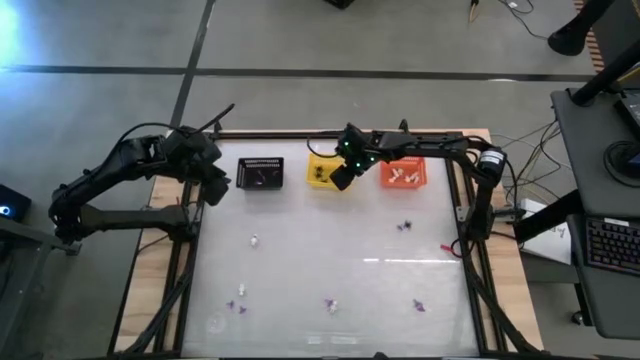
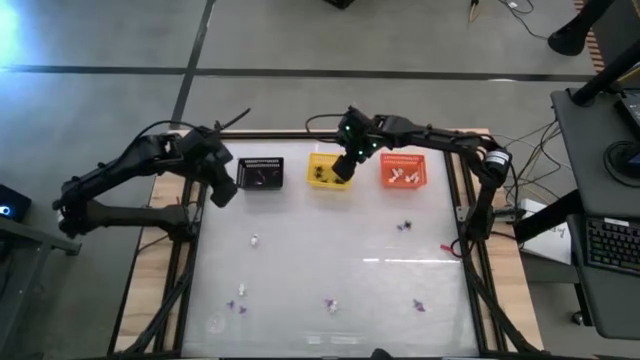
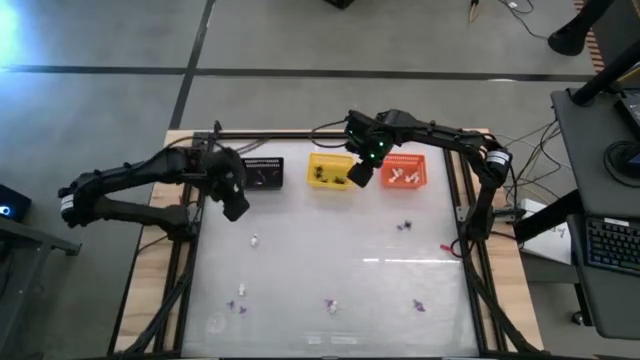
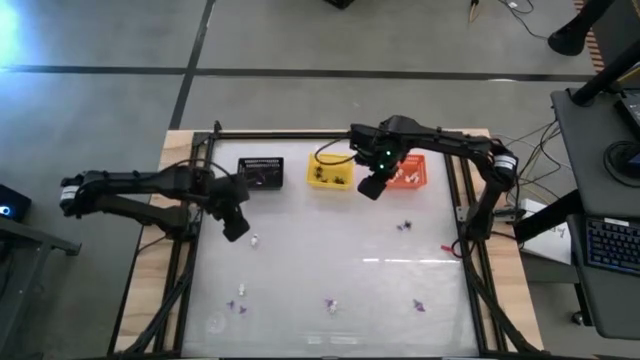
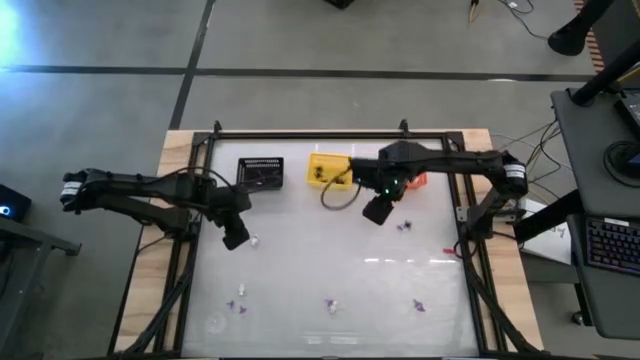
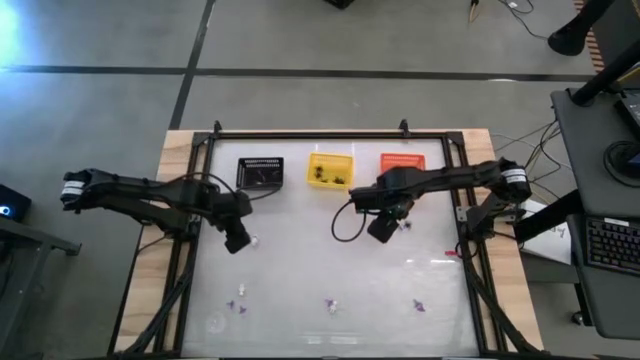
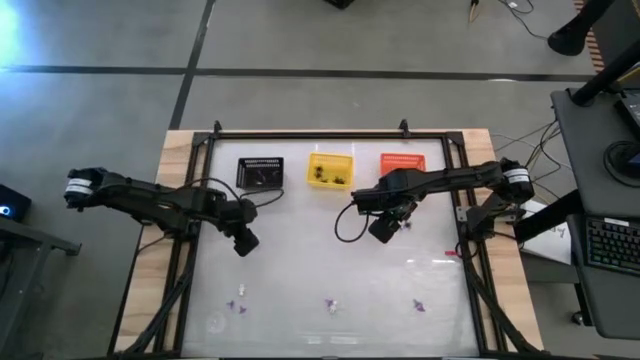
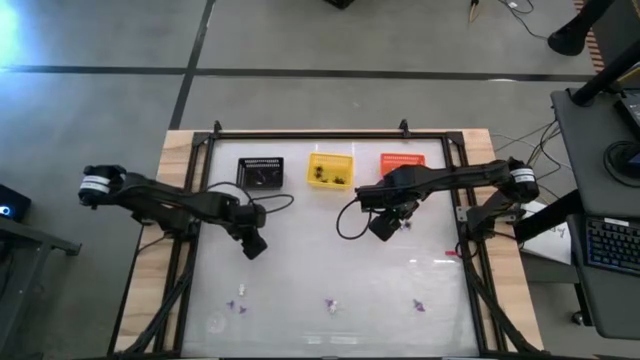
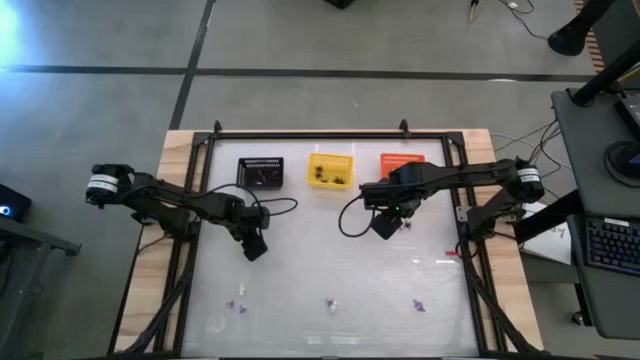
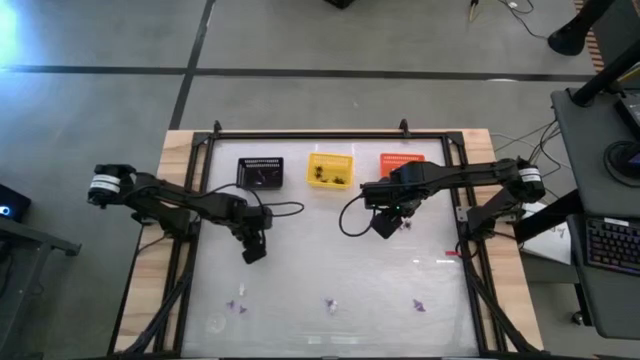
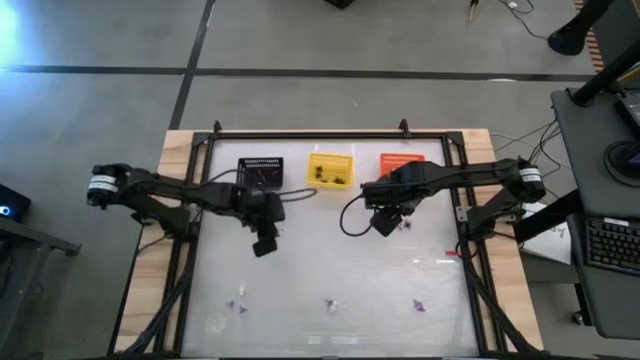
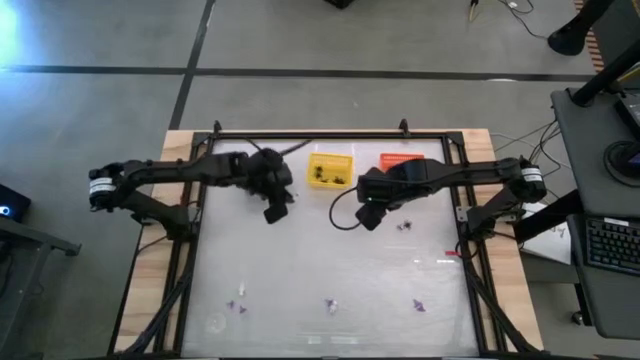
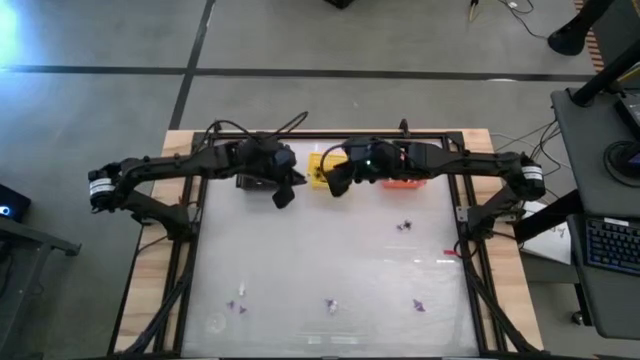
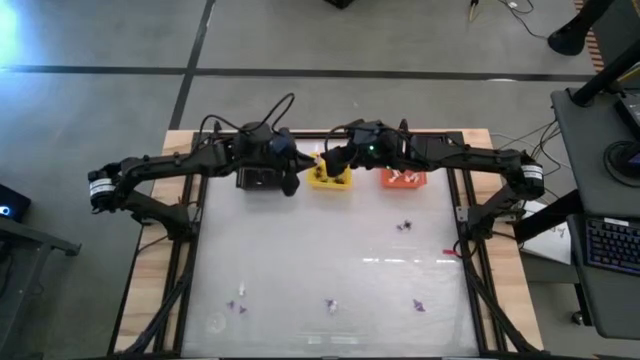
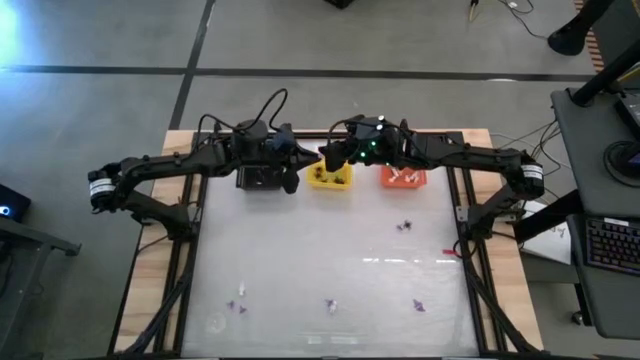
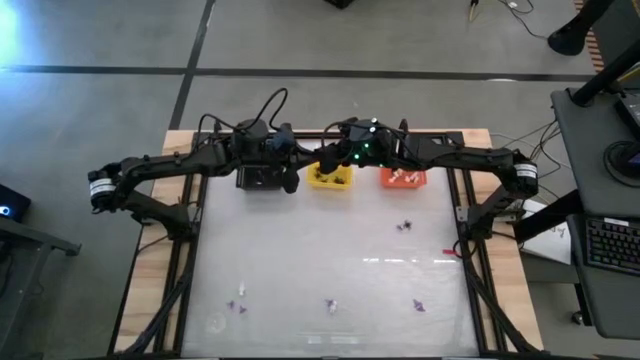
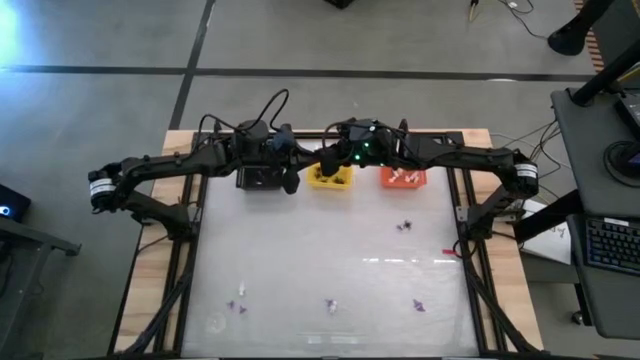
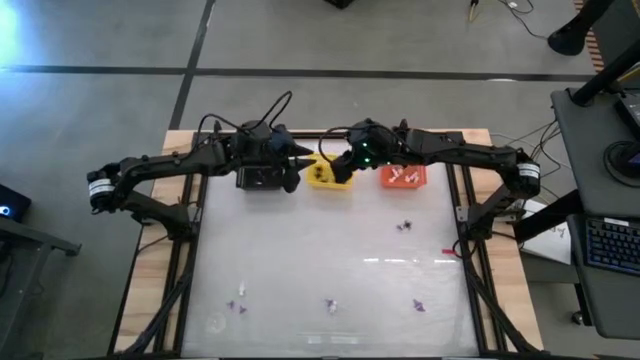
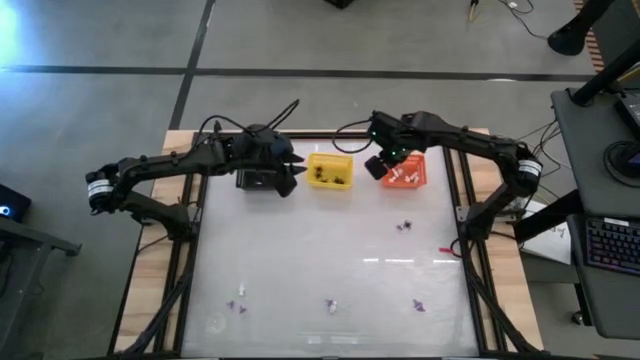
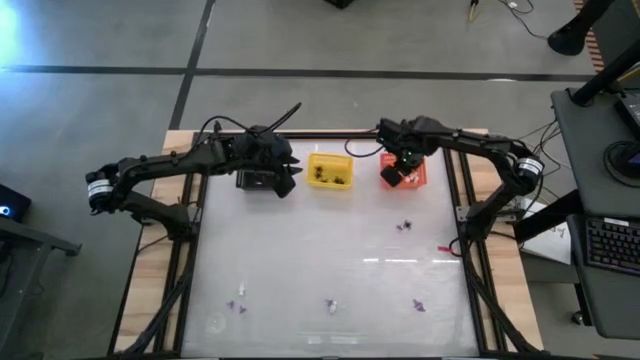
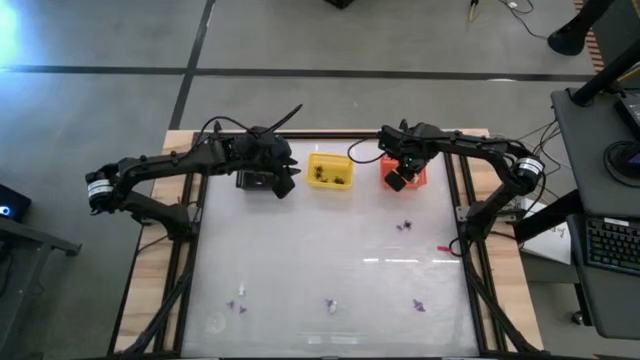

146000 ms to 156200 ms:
Task: Sort Halloween decoration
Put the white skeleton toy into the orange bin

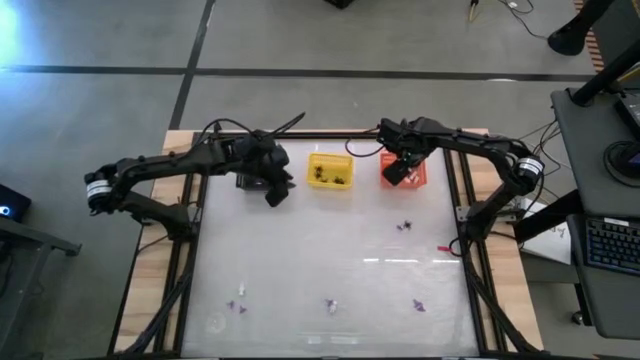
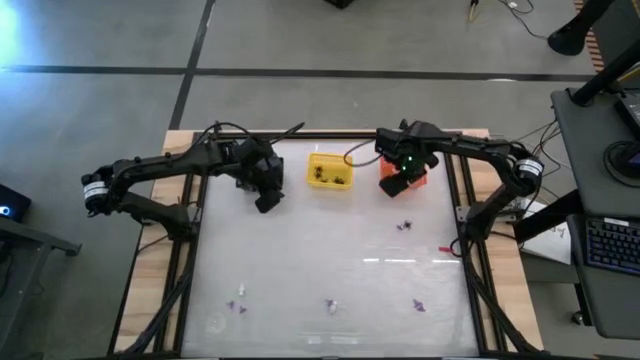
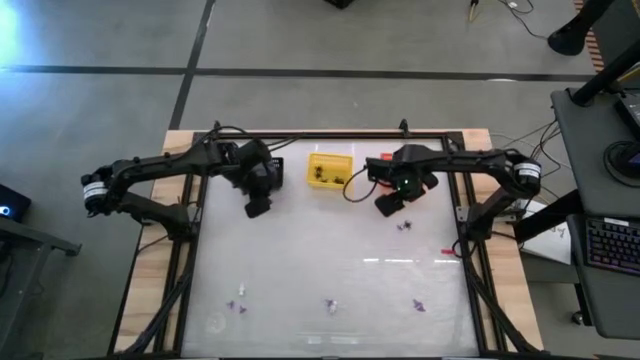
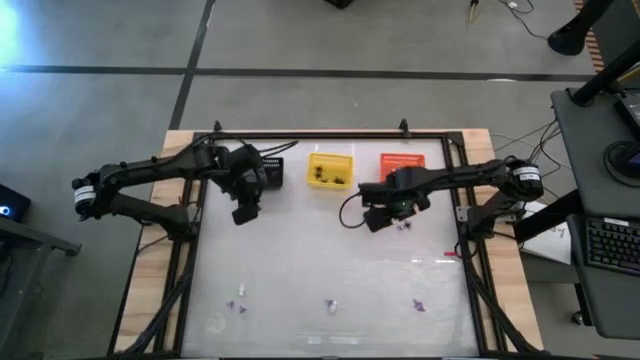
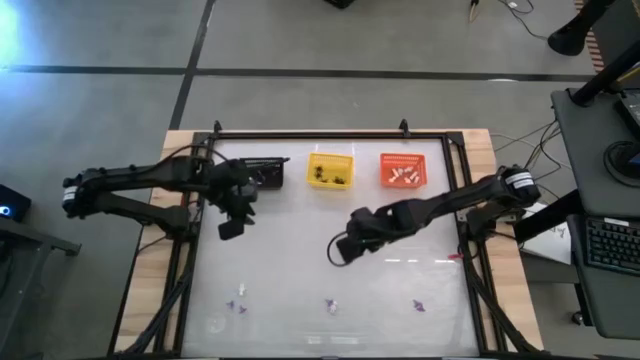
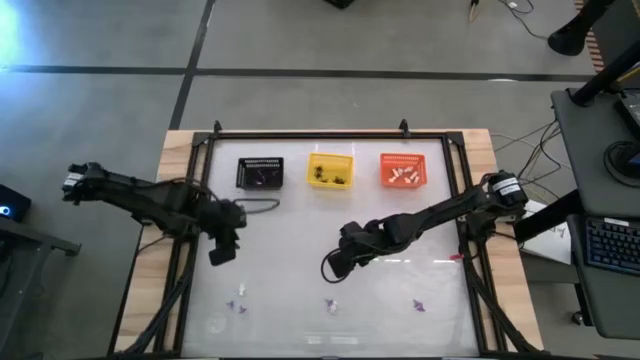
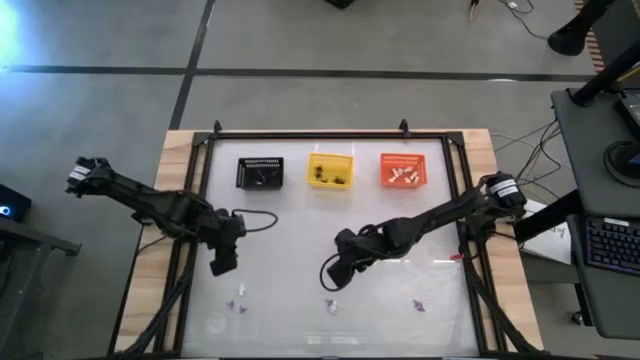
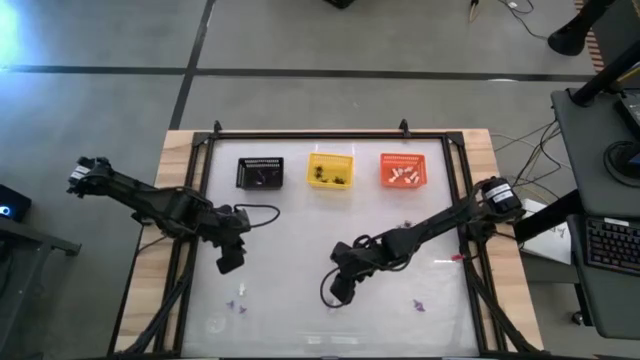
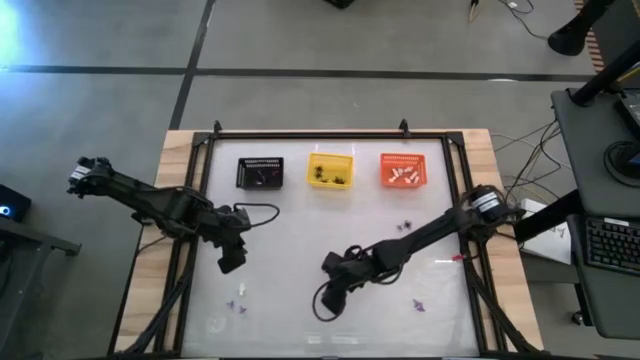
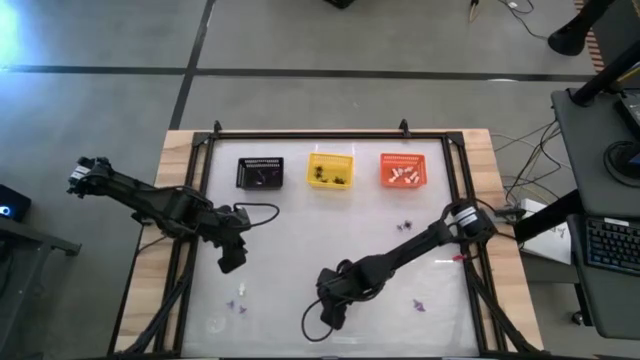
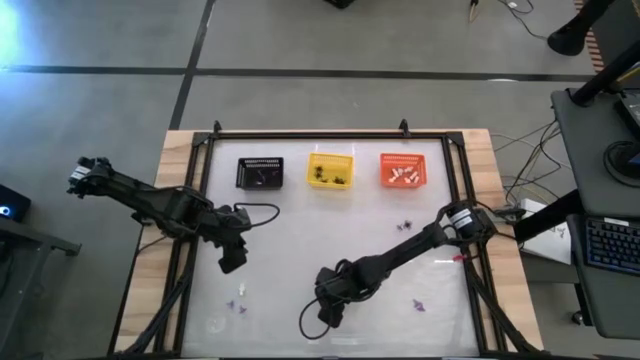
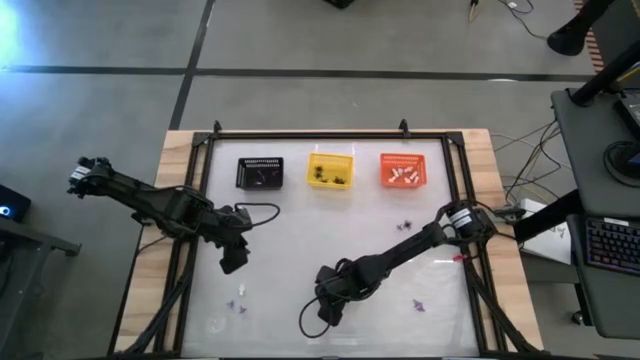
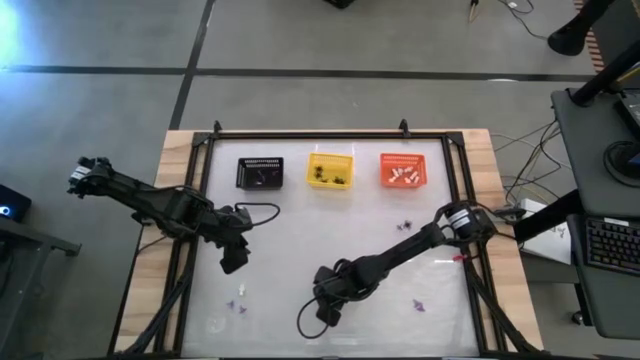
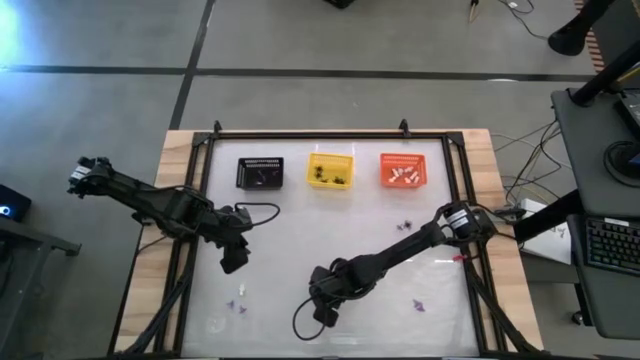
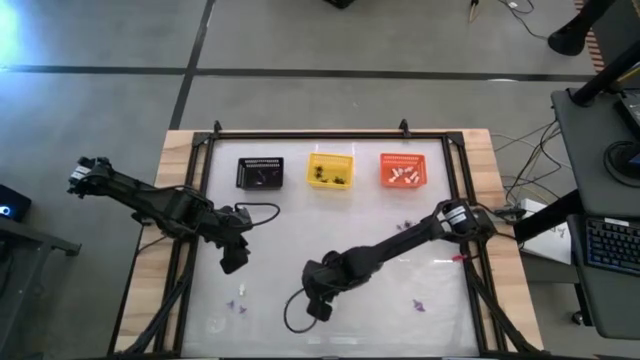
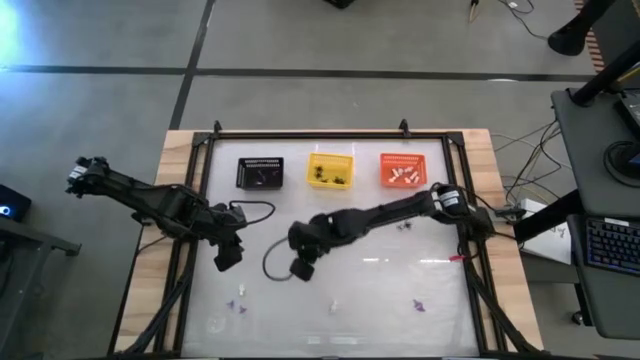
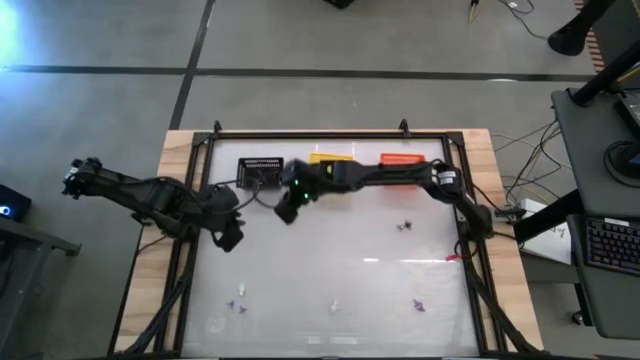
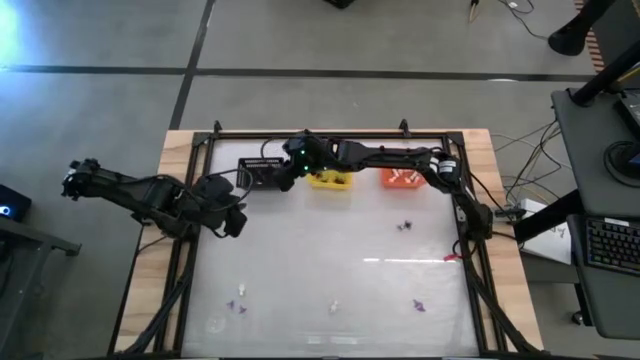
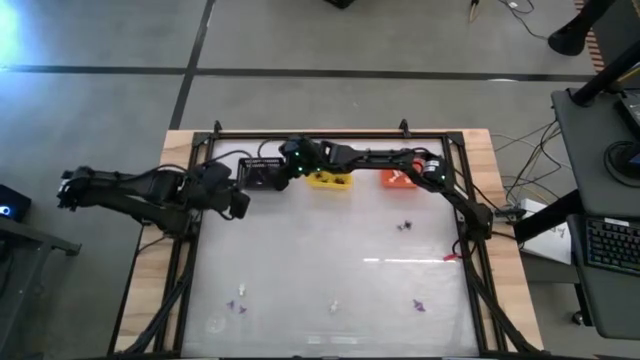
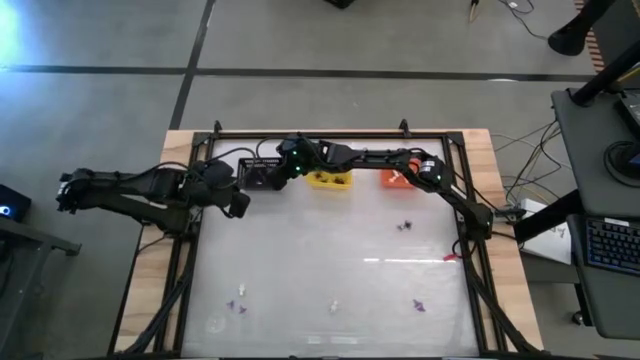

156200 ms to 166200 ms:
Put the violet hat toy into the black bin
